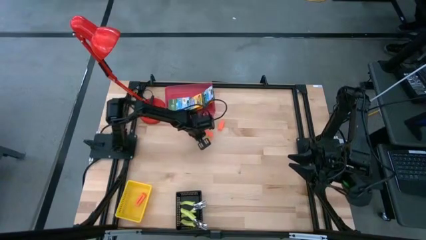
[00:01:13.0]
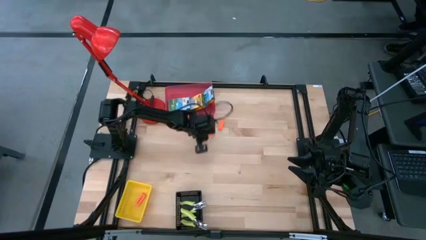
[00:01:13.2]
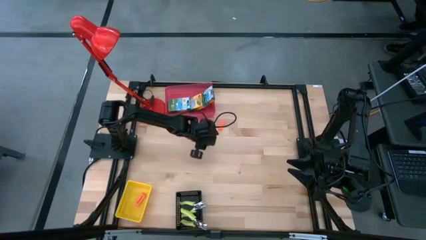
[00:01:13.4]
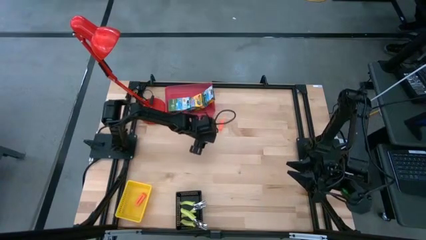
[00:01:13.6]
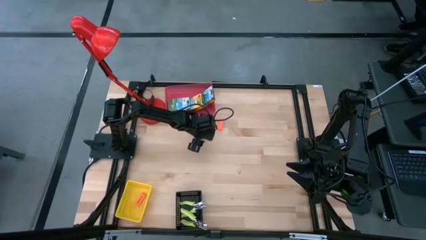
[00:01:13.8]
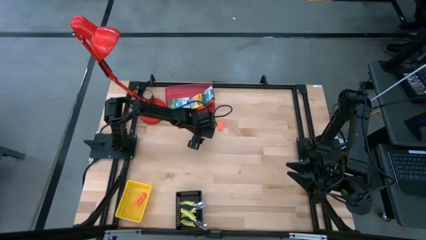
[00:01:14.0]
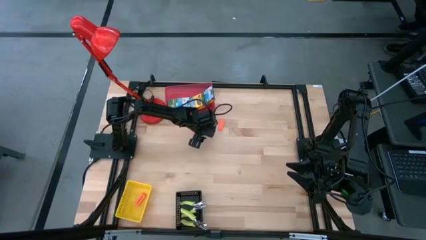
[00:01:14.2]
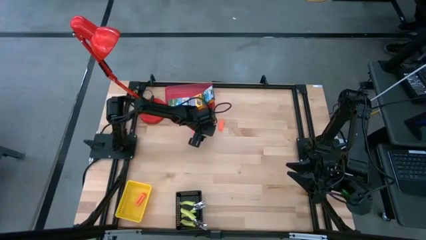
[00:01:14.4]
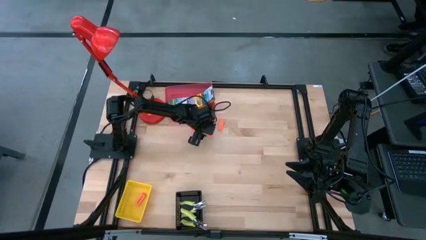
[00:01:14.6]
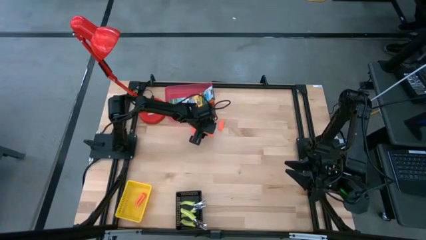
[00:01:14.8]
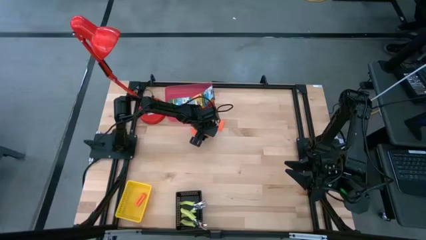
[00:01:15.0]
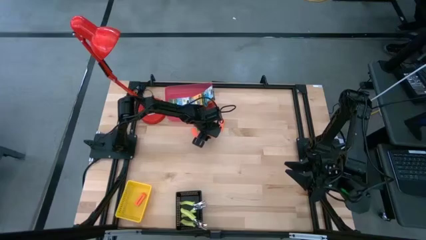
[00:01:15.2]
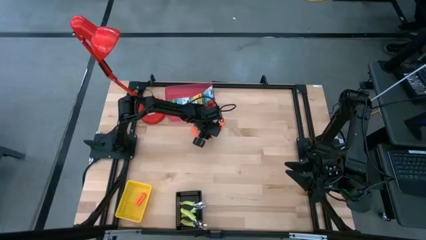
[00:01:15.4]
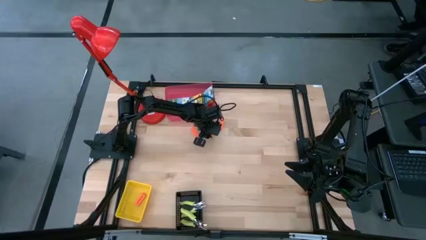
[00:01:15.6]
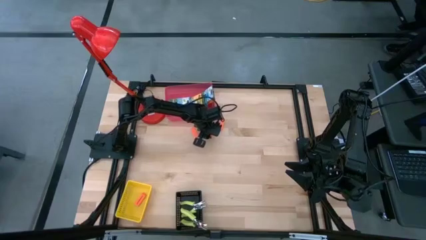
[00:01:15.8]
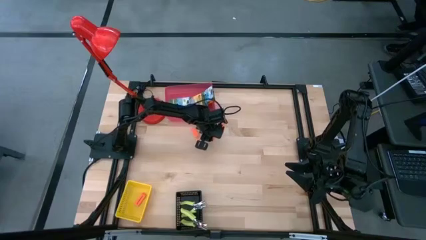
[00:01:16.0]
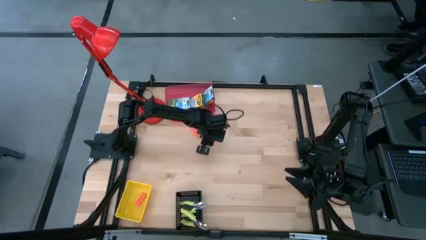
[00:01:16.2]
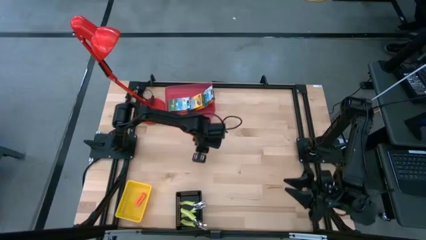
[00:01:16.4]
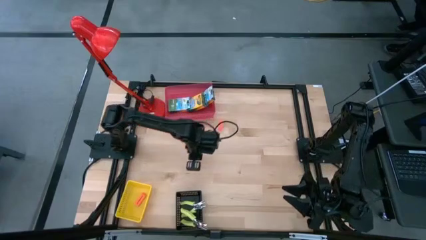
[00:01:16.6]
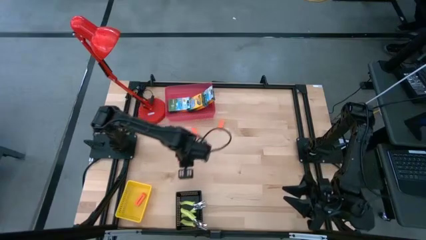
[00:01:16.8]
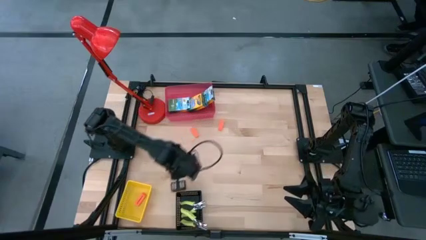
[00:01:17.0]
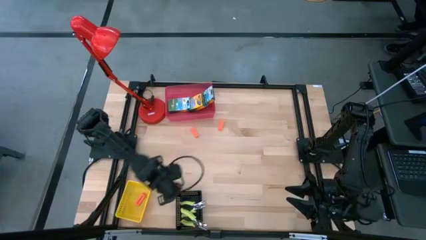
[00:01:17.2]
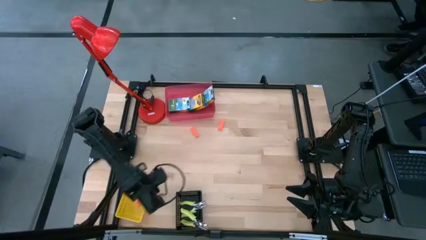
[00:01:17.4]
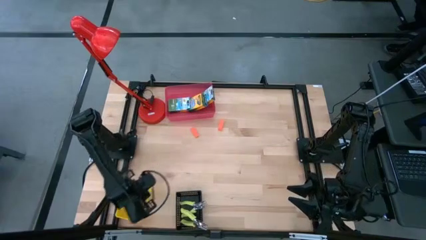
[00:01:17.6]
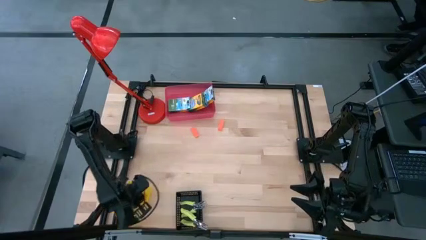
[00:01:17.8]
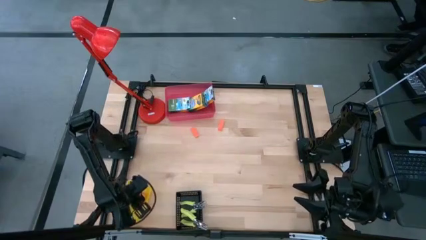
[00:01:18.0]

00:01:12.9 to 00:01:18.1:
Task: Pick & Place School Supplies
Put the orange eraser into the yellow bin

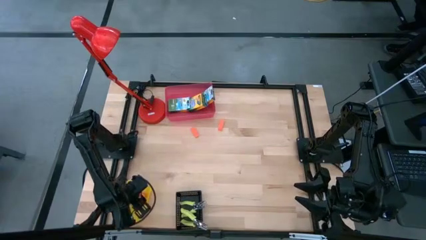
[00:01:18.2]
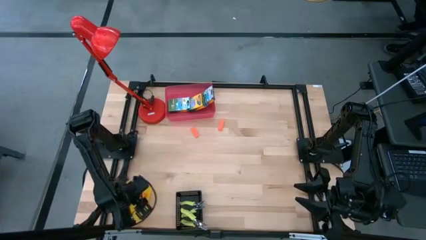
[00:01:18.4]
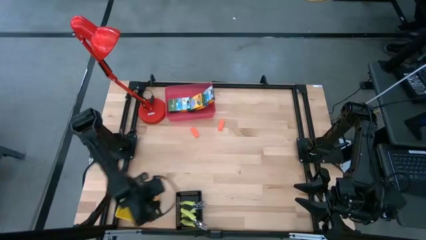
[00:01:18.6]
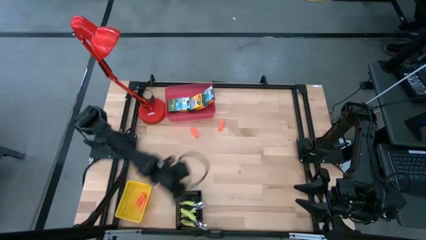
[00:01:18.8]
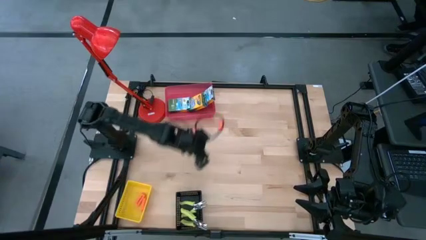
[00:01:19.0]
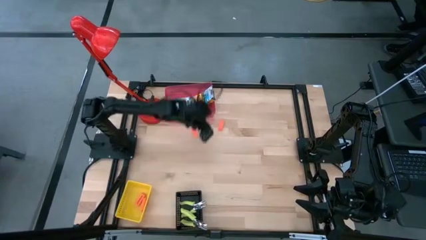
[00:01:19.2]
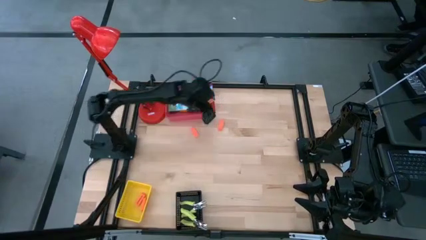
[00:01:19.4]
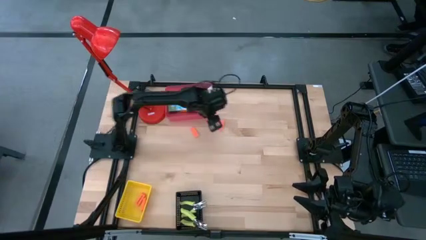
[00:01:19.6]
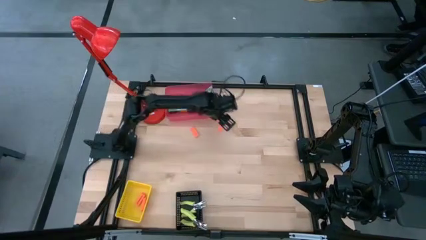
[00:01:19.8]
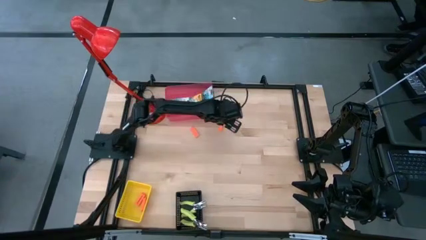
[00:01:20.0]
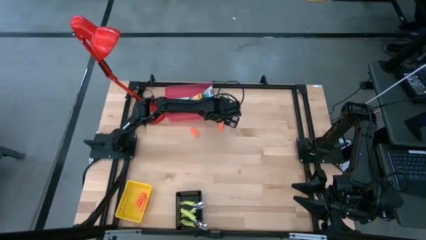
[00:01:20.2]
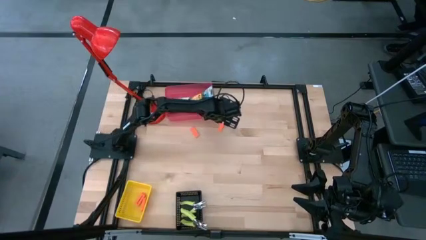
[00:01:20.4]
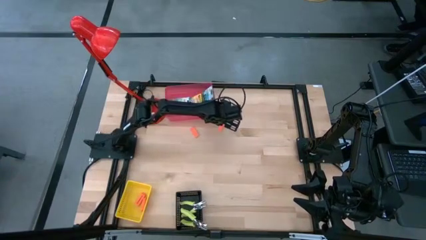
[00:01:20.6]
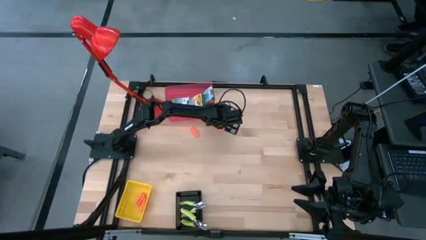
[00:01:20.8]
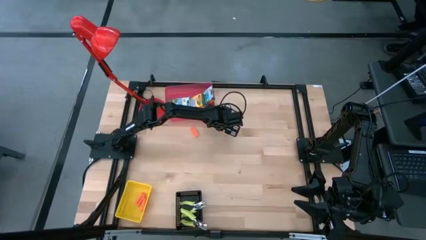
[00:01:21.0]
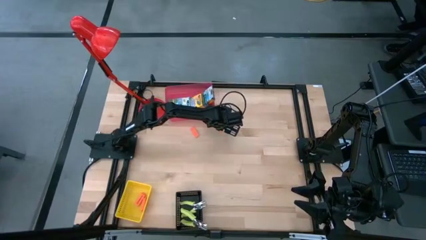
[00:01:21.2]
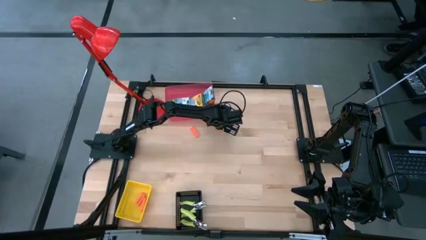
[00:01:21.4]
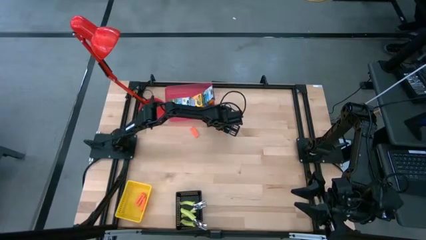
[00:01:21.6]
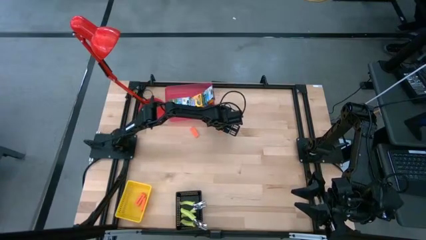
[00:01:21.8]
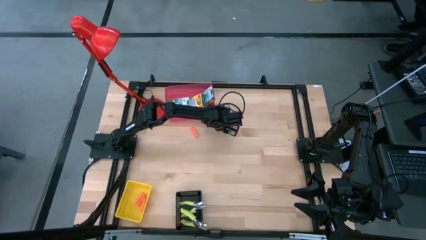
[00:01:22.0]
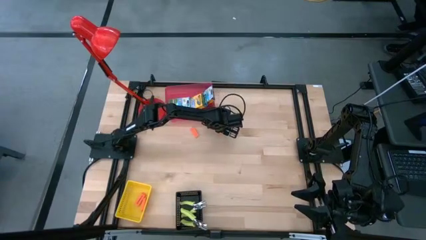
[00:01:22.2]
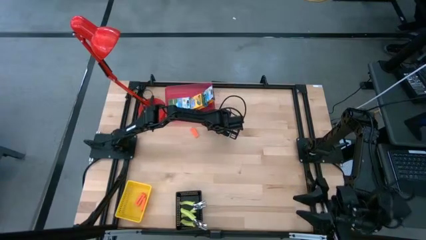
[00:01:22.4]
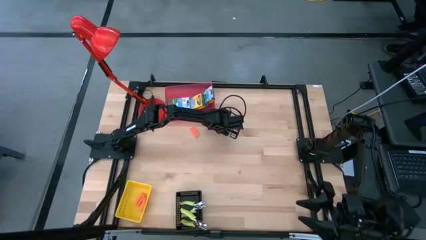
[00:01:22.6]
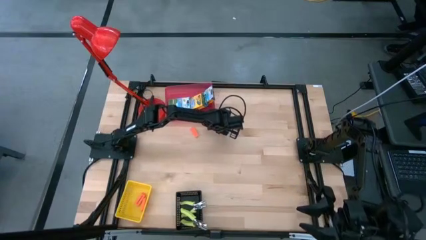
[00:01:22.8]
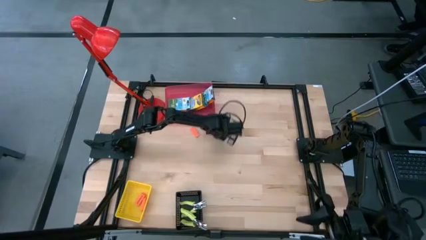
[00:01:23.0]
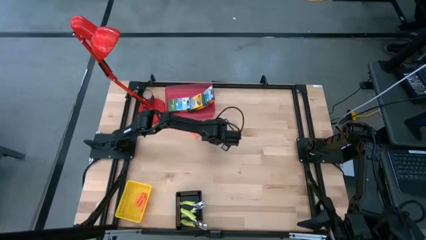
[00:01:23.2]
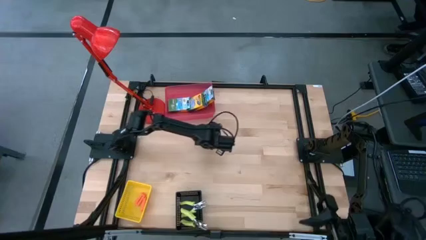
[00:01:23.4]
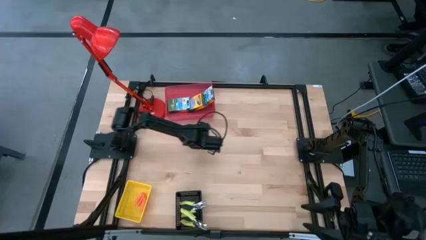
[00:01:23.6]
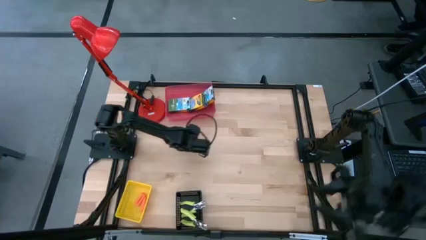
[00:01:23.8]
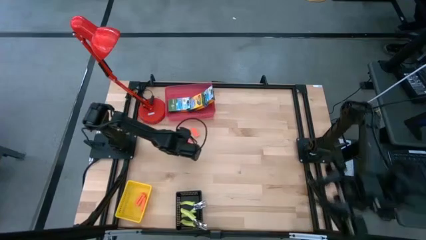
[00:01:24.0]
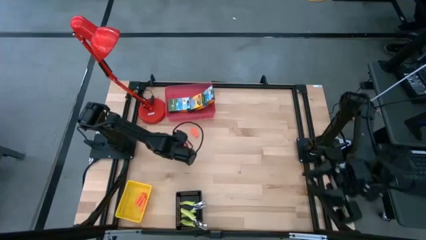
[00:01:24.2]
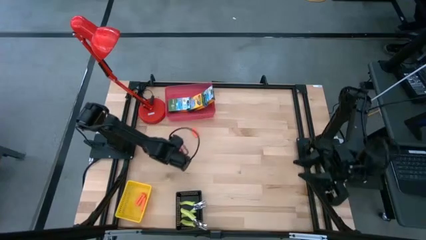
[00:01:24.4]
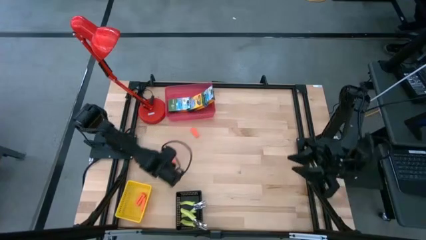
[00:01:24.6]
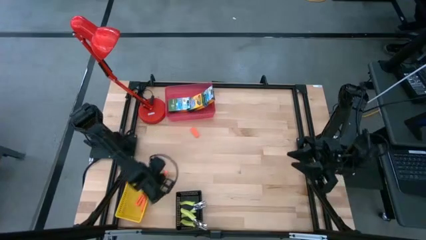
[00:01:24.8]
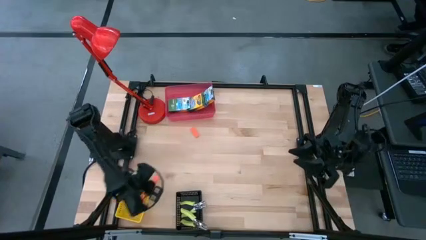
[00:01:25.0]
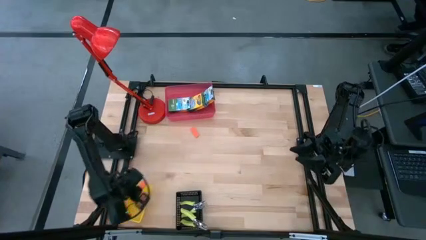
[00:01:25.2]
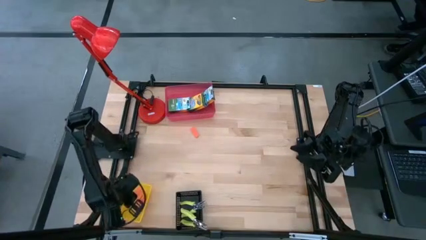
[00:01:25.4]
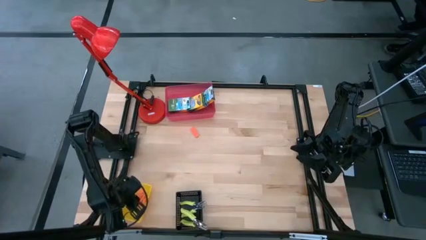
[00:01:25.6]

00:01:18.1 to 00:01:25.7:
Put the orange eraser into the yellow bin

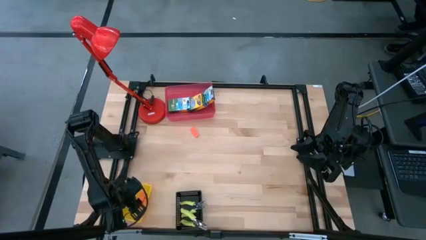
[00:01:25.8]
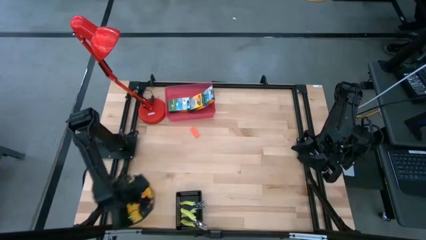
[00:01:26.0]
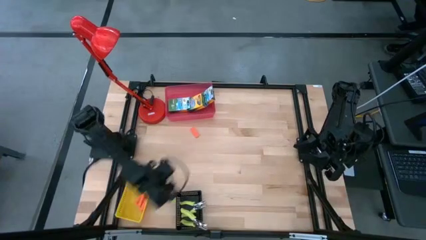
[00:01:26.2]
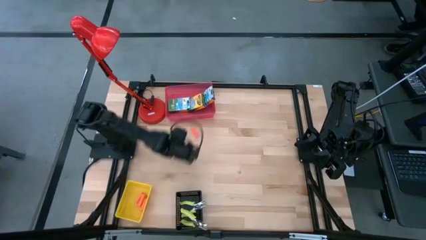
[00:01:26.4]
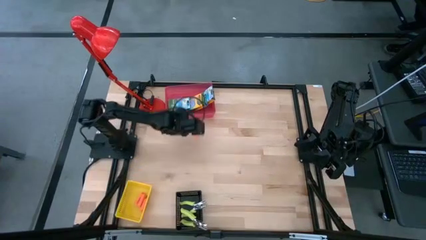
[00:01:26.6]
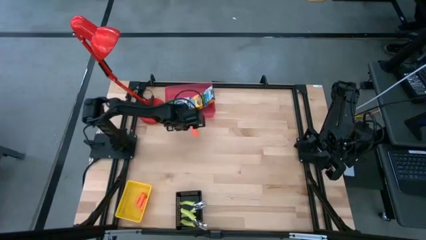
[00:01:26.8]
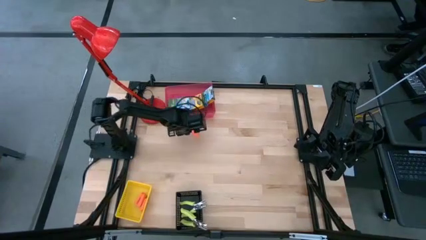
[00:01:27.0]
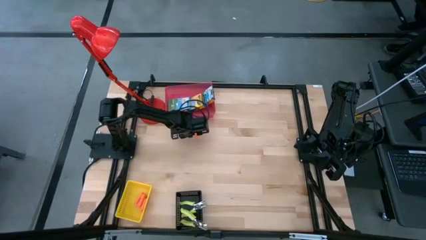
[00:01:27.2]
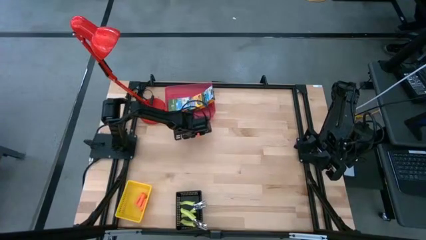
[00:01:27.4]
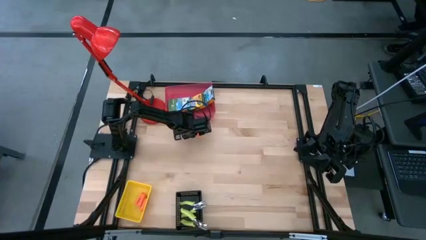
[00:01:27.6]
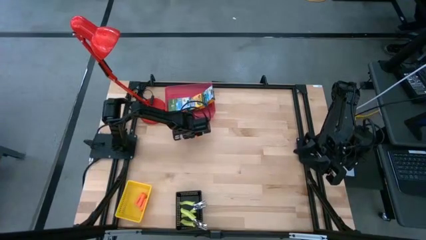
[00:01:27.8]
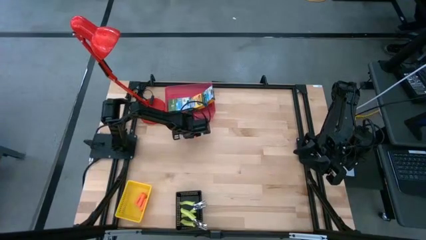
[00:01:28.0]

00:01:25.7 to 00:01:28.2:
Put the orange eraser into the yellow bin

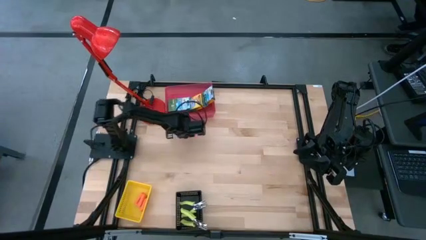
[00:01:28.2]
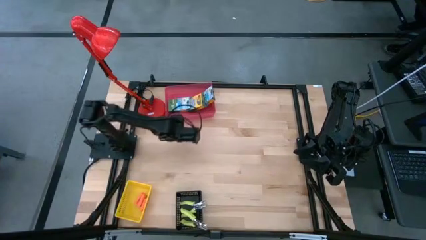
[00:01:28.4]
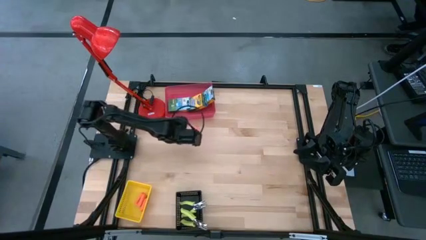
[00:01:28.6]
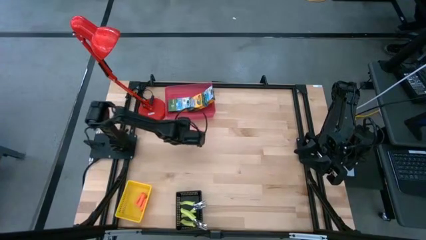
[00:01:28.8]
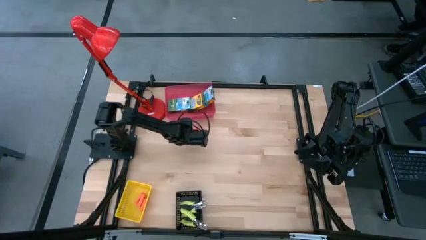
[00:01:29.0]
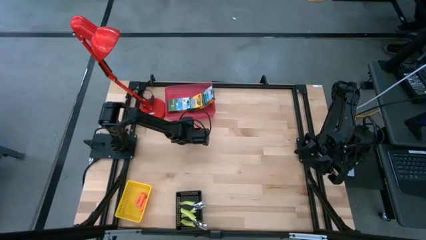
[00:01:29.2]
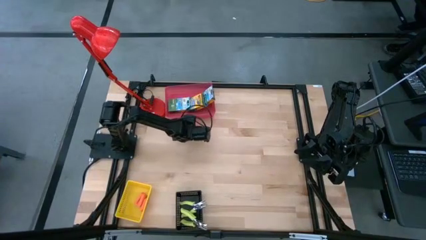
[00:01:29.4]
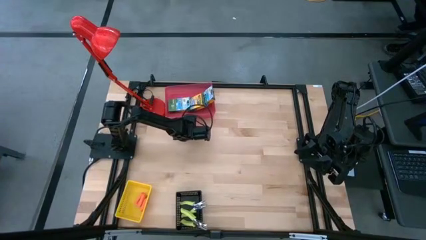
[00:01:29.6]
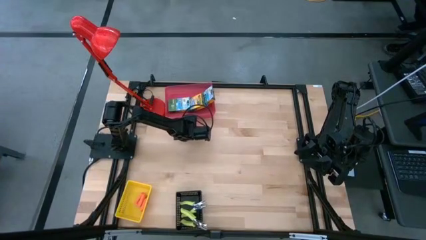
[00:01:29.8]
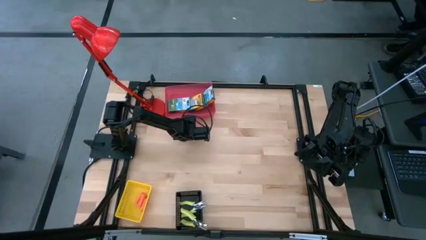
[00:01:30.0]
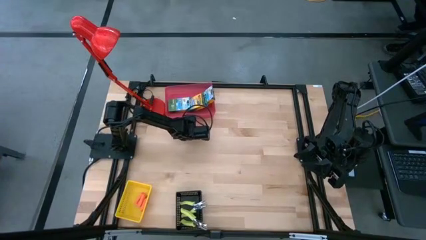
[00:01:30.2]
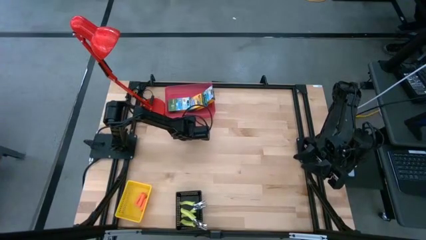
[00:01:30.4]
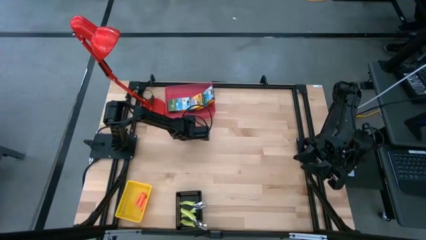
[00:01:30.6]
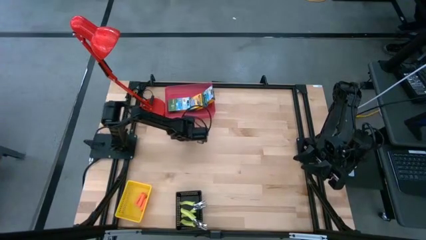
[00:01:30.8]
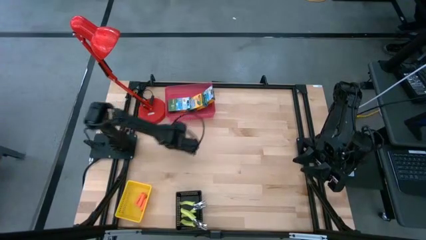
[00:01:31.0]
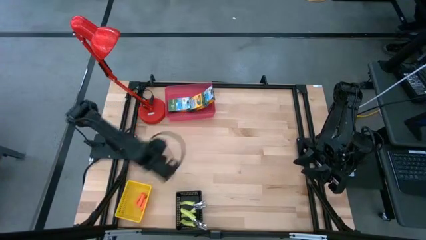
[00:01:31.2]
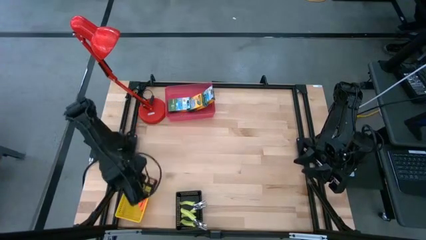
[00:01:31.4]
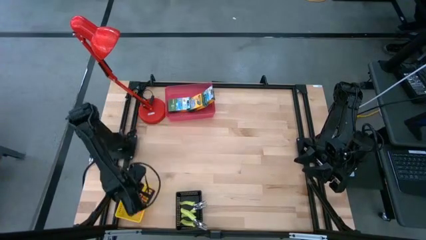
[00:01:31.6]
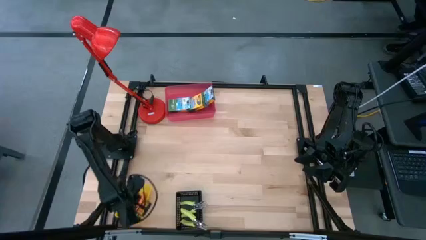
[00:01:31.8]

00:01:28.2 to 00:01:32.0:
Put the orange eraser into the yellow bin
